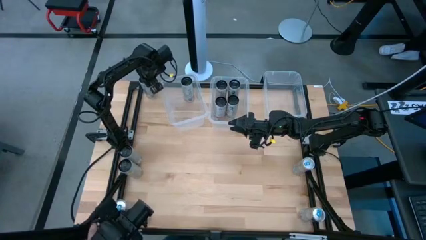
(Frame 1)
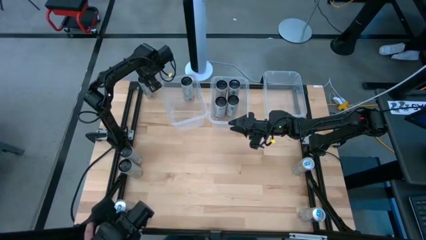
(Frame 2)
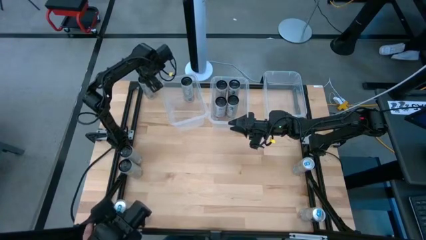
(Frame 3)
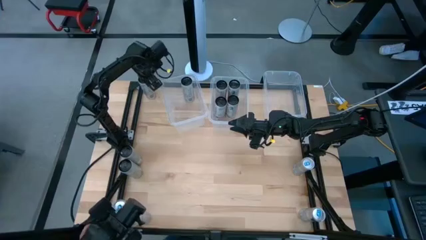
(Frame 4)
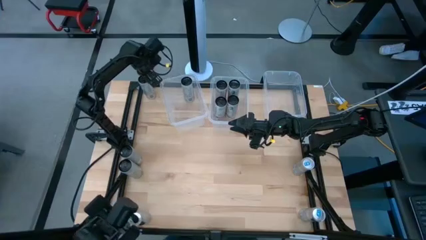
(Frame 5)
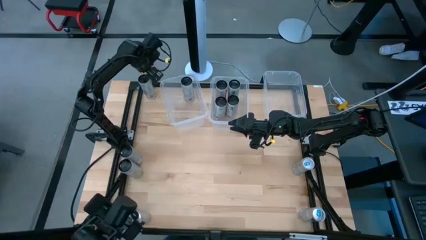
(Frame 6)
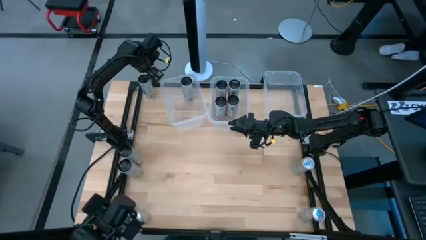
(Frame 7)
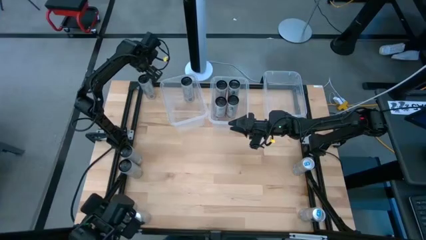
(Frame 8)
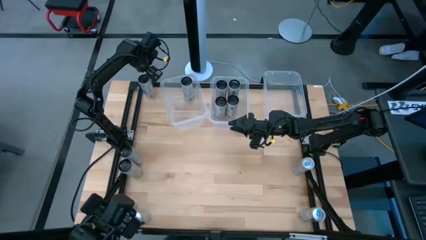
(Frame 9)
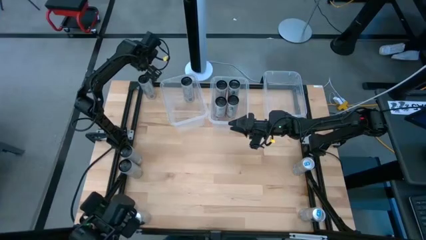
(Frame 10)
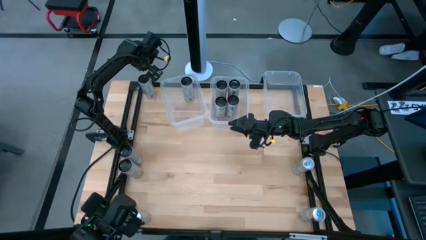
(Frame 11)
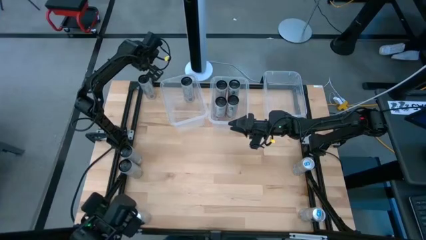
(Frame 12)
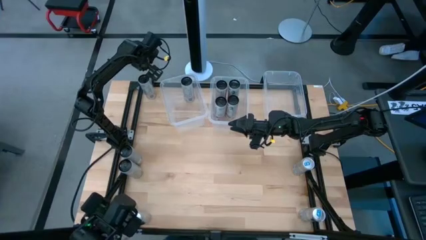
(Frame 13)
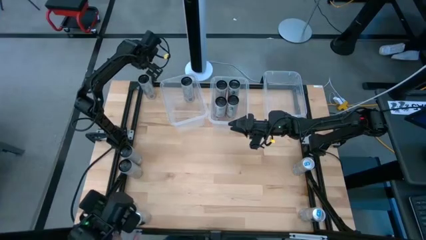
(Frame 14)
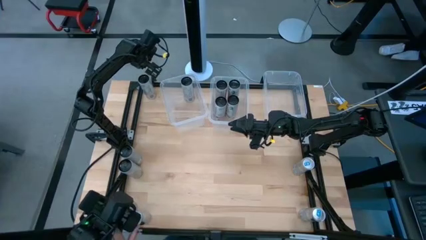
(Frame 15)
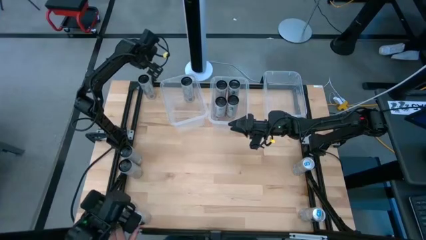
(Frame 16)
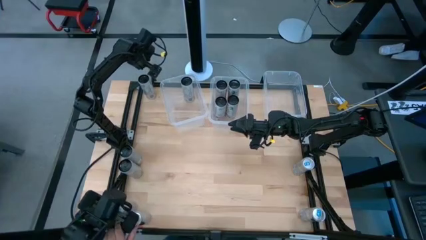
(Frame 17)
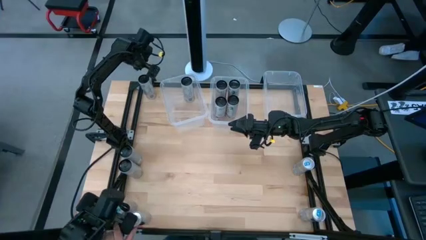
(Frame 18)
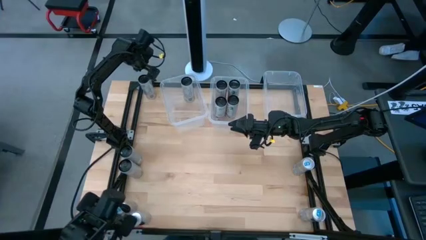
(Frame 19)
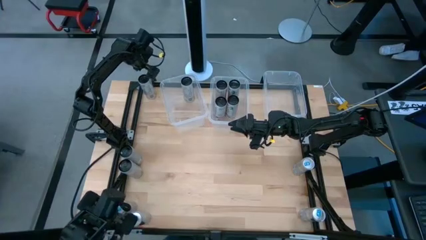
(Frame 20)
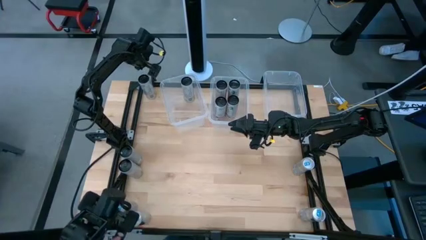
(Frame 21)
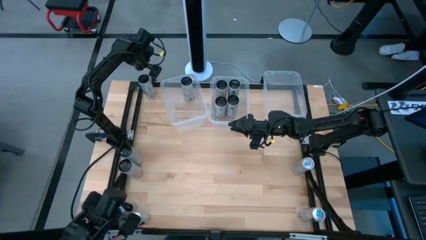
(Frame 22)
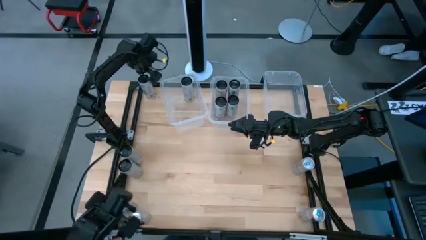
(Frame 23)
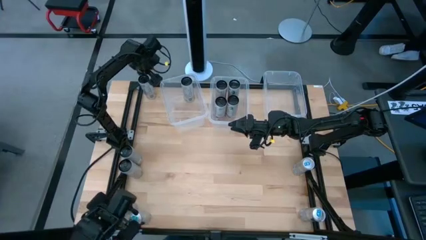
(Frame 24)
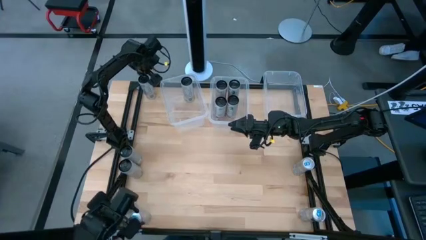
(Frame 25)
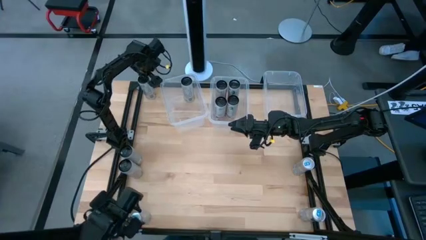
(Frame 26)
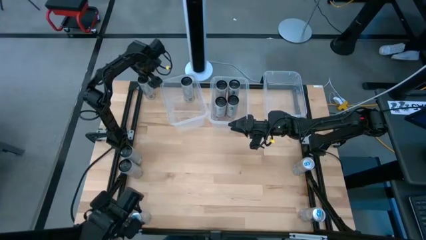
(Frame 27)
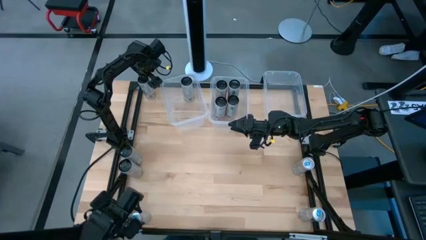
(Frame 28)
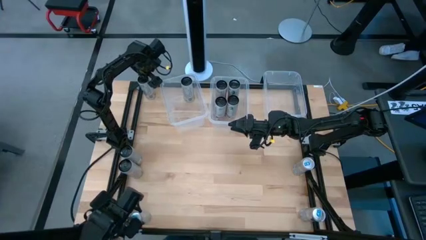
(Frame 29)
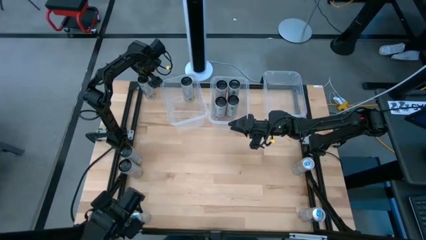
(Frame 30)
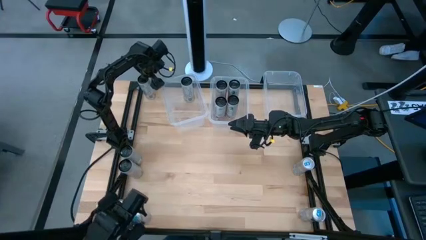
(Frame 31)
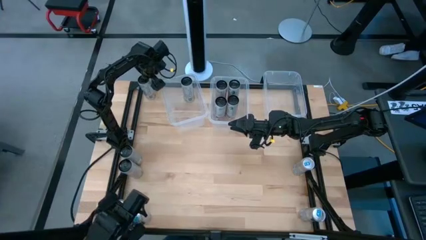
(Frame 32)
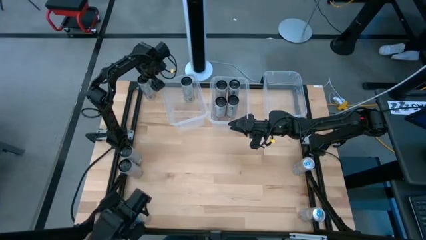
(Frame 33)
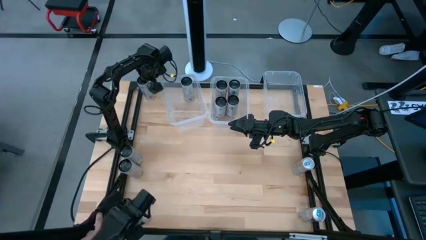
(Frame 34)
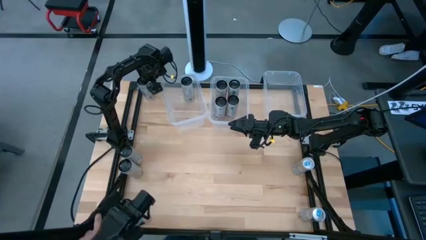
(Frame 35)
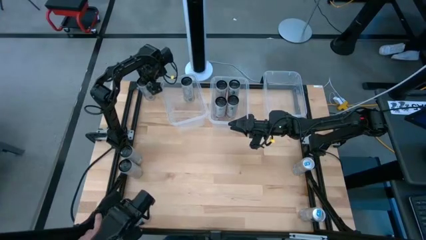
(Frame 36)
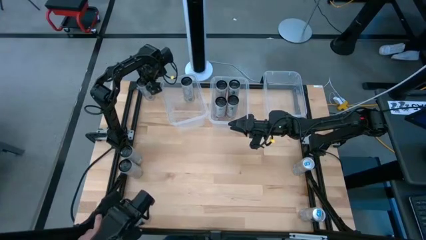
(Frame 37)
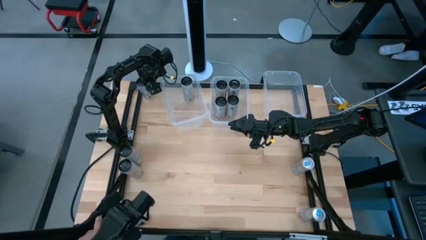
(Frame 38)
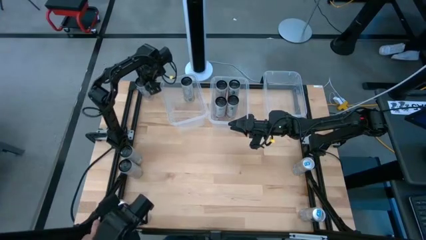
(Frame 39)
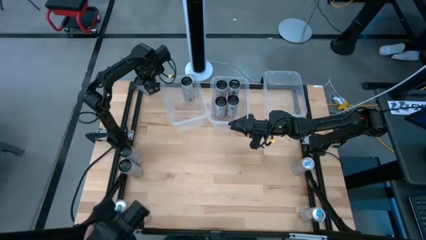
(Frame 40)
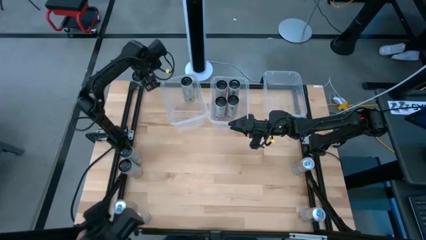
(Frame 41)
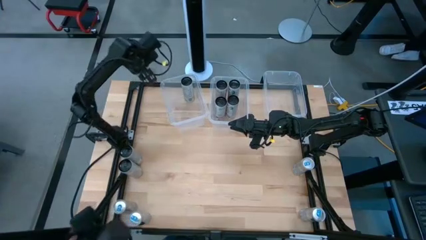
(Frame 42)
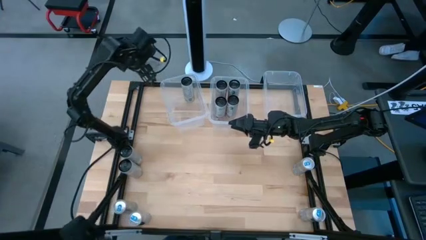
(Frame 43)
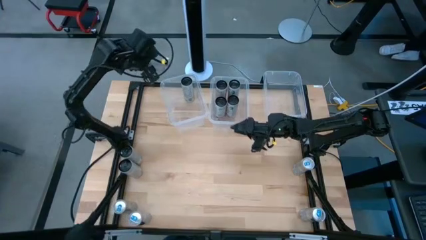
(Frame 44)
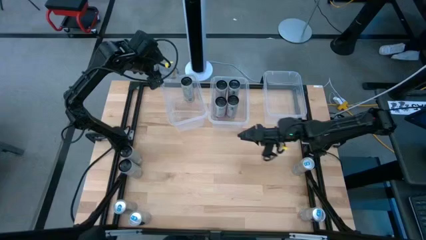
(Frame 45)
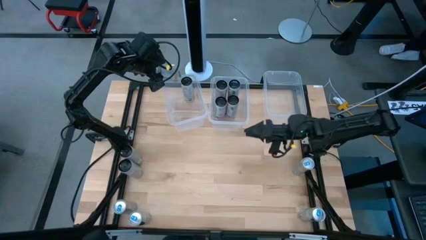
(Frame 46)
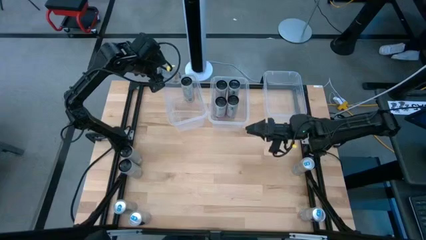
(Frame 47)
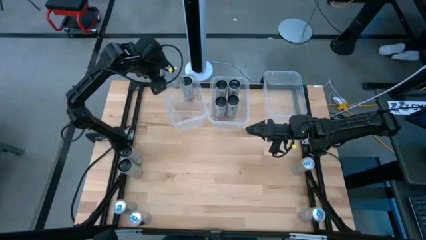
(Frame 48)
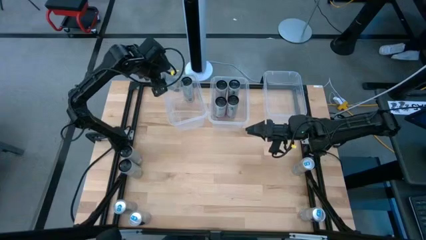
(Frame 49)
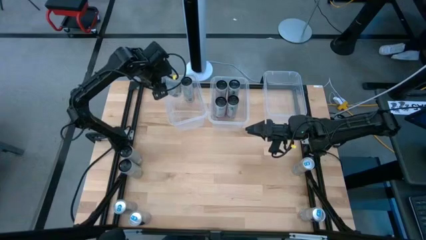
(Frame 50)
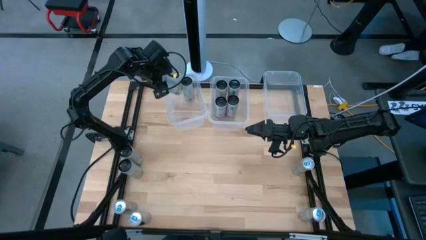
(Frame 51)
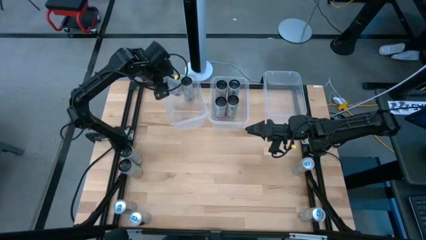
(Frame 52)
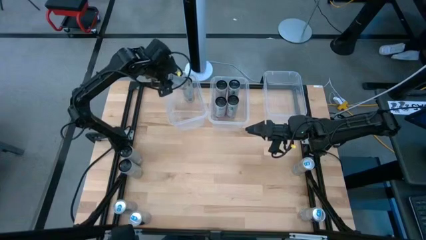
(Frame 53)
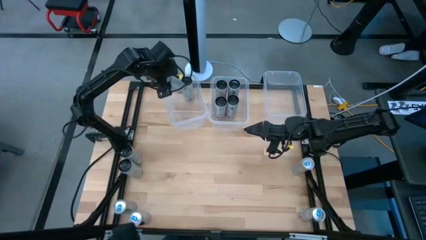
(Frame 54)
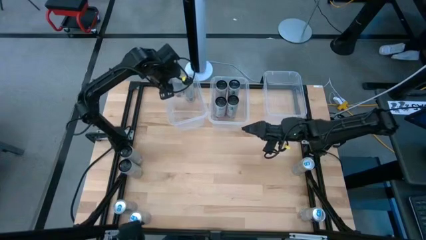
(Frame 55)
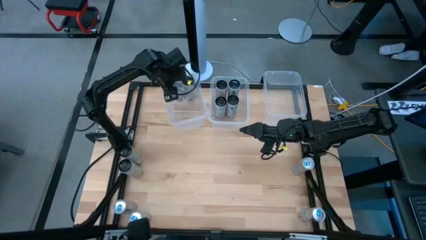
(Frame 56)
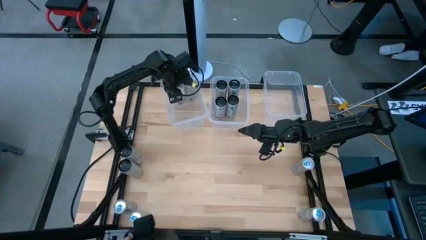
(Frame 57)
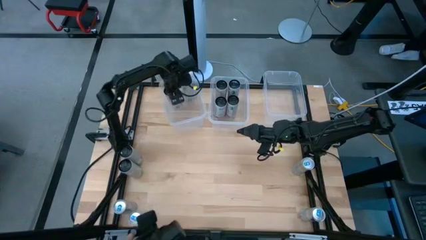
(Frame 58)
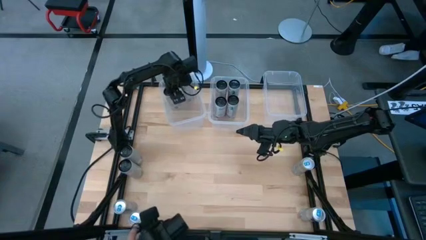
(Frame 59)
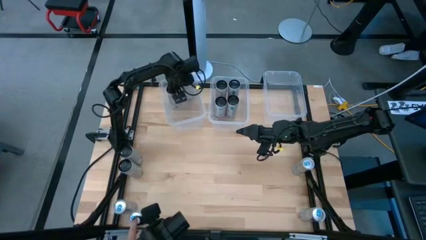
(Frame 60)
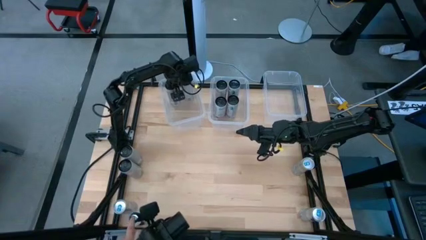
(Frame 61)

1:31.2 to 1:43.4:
Task: Sort soda cans
Put the top white and black starfruit soda can into the left transparent bin

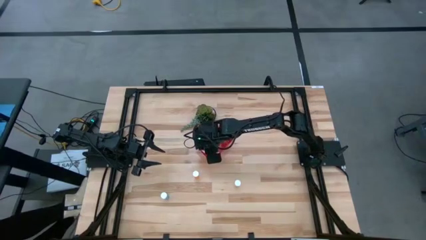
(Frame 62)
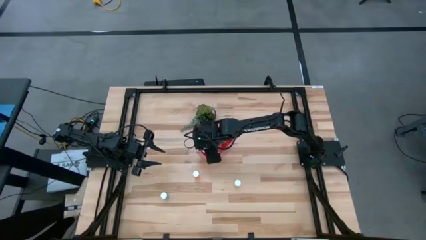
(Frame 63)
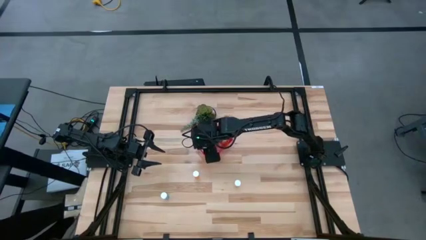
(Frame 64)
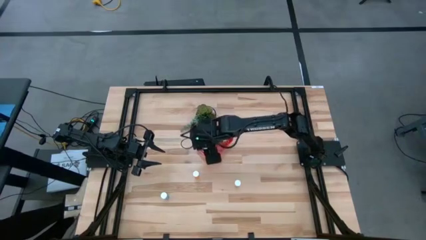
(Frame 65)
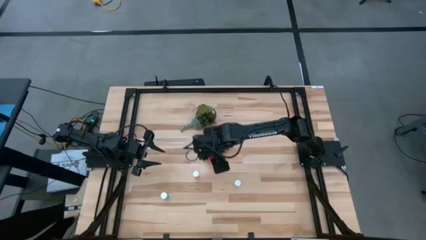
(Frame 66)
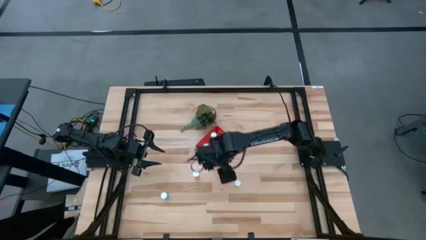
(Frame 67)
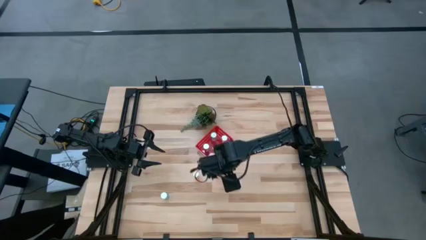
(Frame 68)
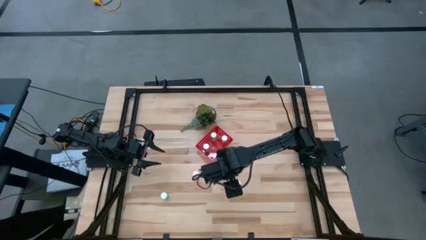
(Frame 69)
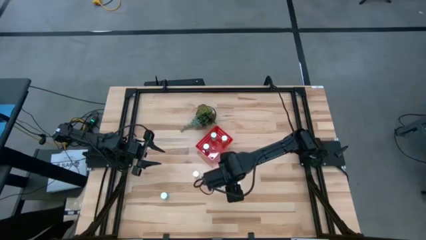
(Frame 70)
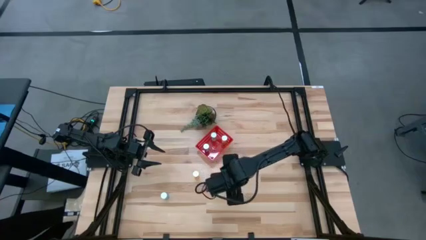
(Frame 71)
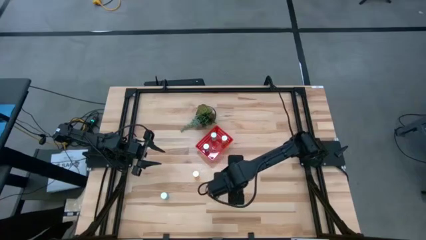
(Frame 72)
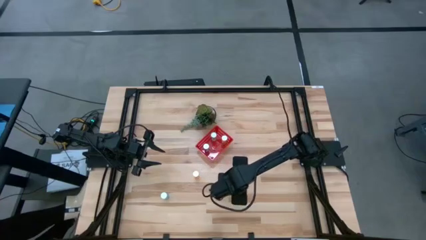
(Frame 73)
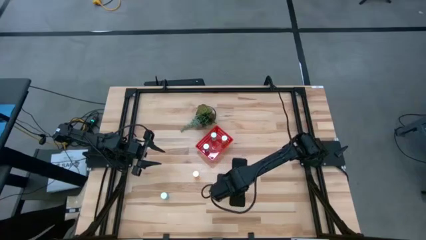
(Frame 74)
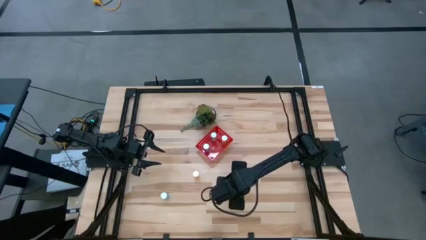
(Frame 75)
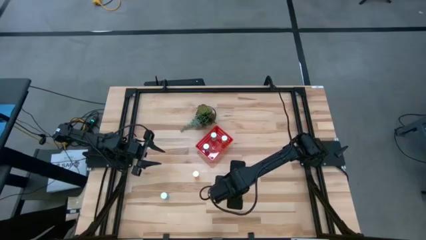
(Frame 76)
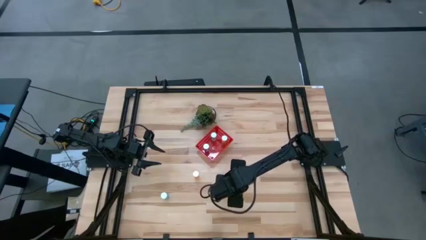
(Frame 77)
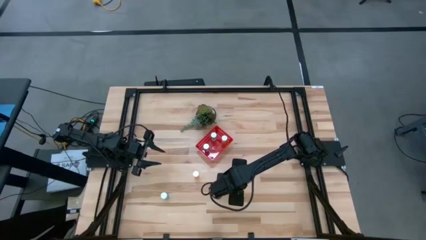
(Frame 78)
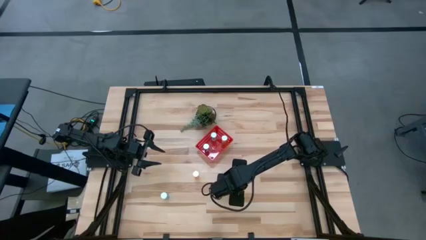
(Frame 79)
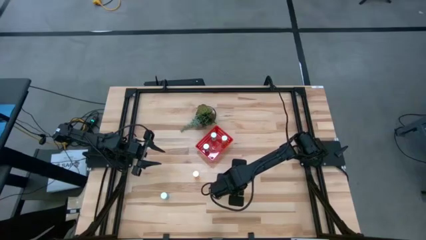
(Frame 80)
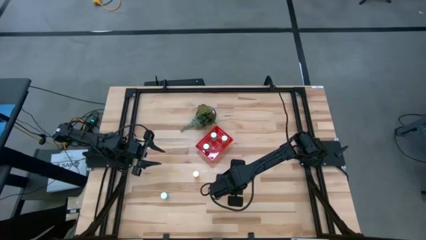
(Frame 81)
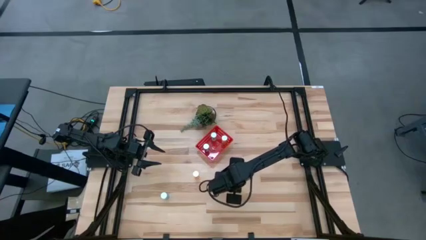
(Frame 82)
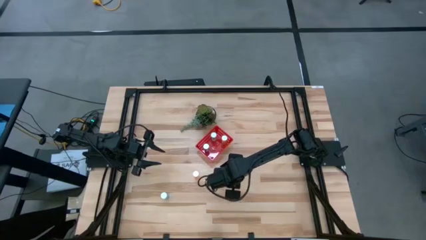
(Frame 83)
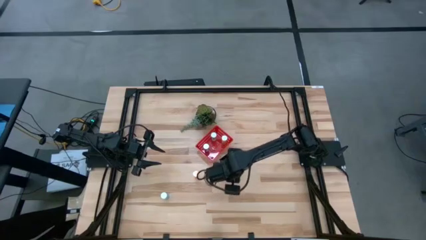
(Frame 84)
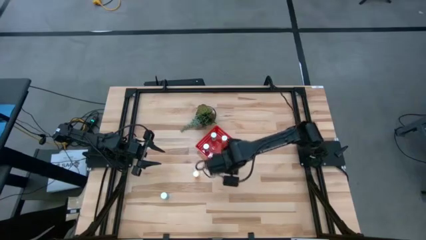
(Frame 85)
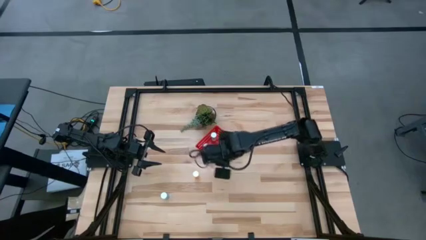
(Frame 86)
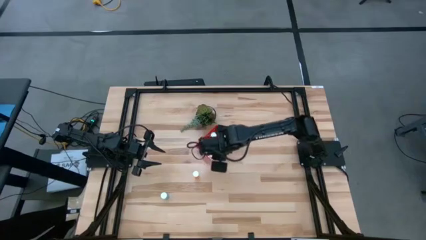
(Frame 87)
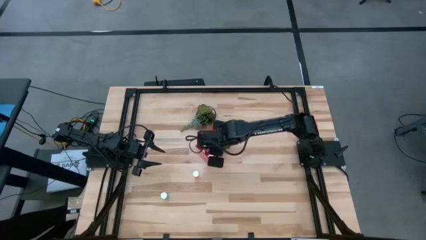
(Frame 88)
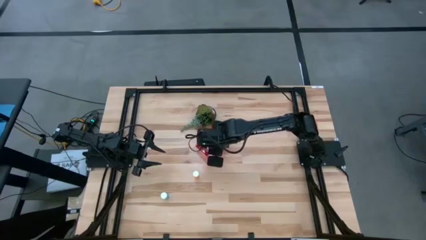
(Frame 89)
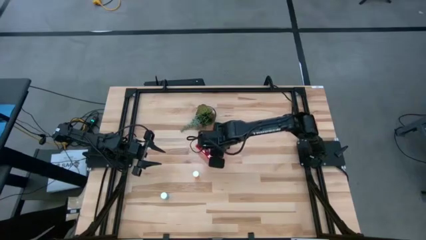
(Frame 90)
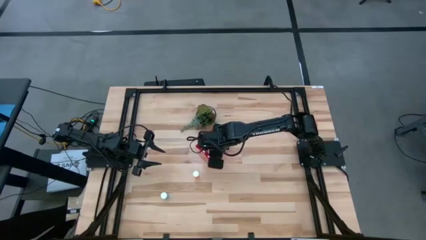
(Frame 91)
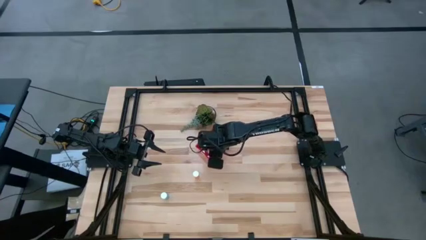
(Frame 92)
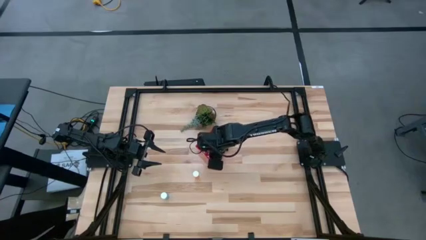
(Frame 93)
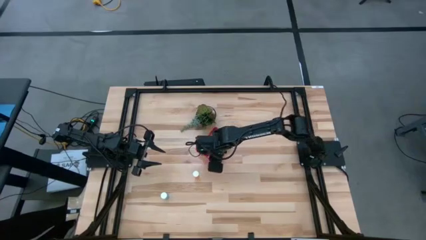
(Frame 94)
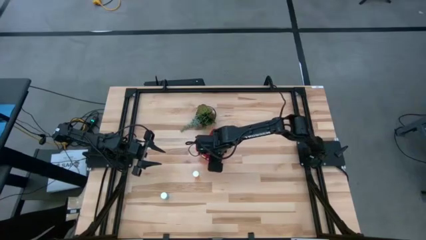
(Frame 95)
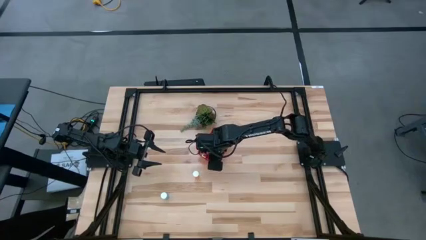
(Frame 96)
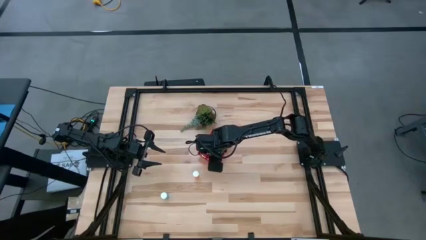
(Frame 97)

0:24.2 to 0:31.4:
Task: Pick and place pill bottles into a basket
Put the yellow pill bottle into the red bin
